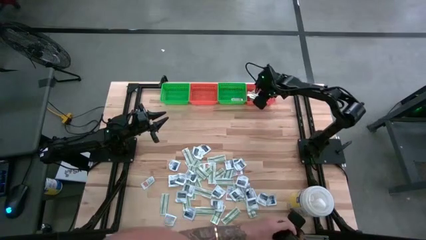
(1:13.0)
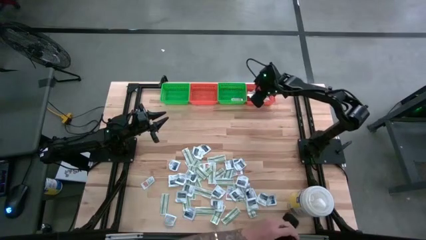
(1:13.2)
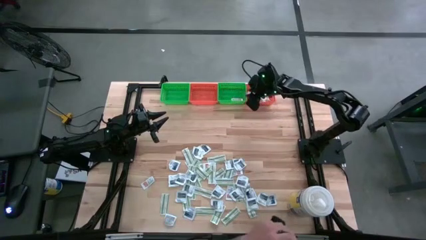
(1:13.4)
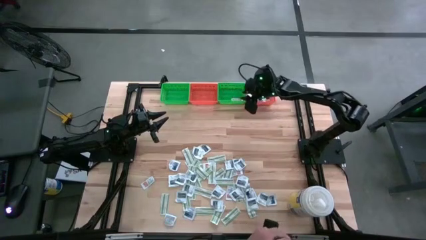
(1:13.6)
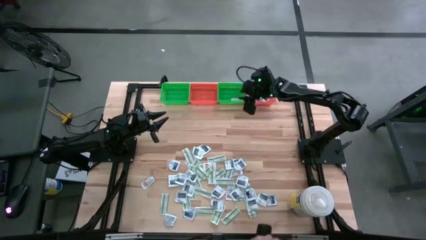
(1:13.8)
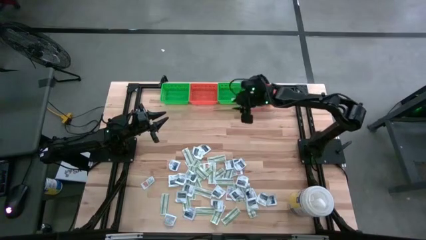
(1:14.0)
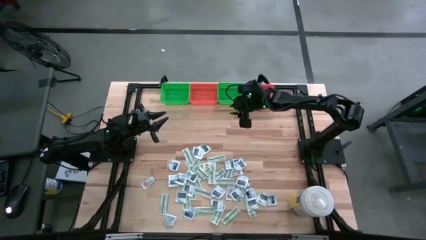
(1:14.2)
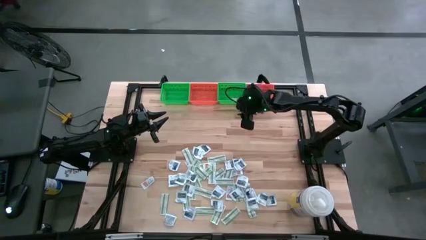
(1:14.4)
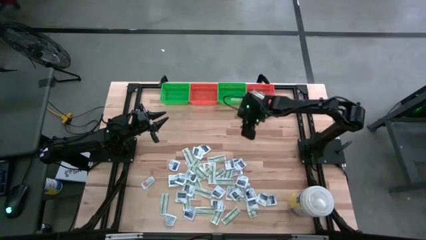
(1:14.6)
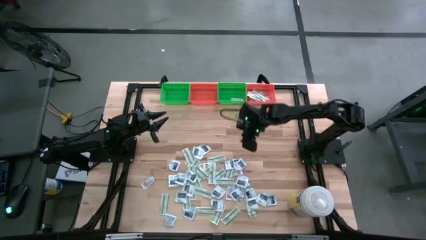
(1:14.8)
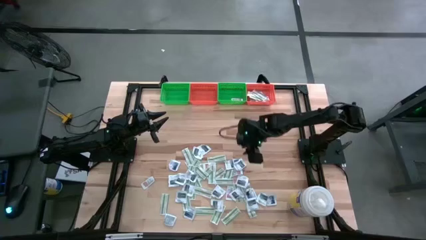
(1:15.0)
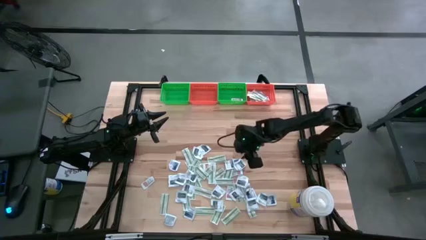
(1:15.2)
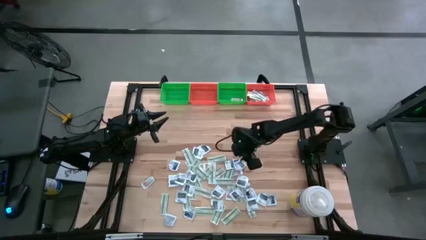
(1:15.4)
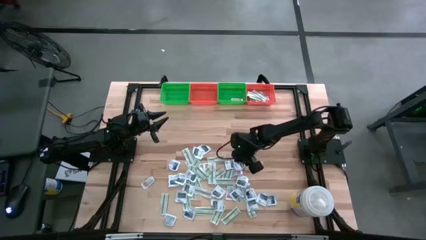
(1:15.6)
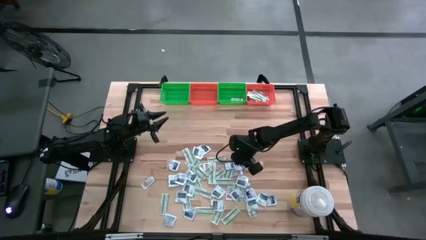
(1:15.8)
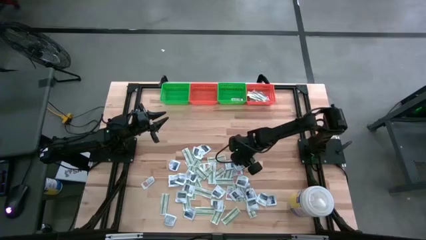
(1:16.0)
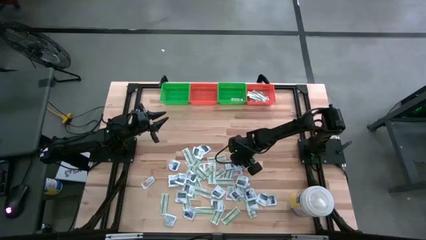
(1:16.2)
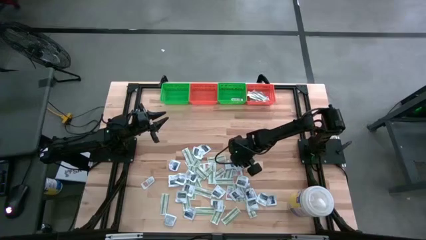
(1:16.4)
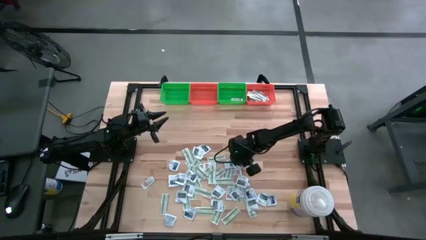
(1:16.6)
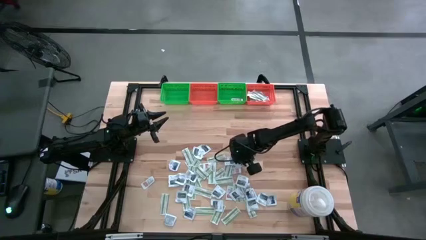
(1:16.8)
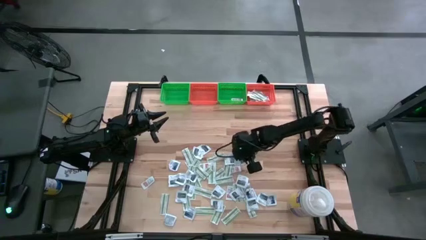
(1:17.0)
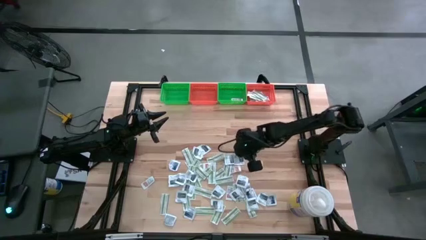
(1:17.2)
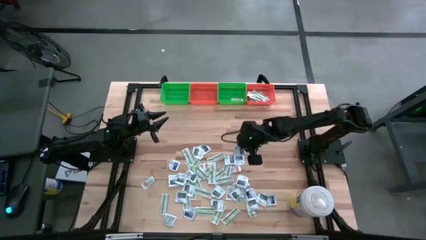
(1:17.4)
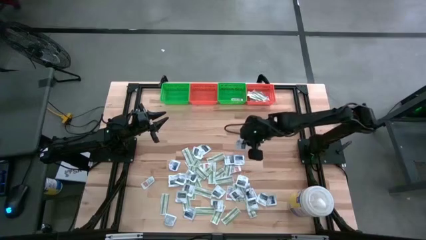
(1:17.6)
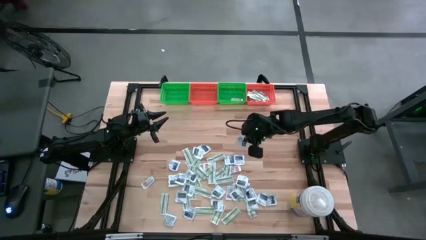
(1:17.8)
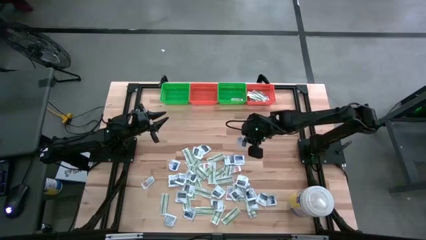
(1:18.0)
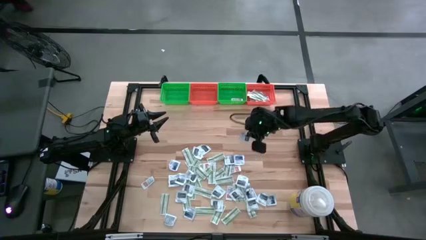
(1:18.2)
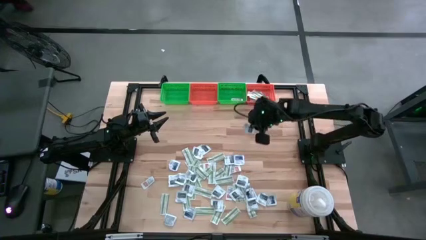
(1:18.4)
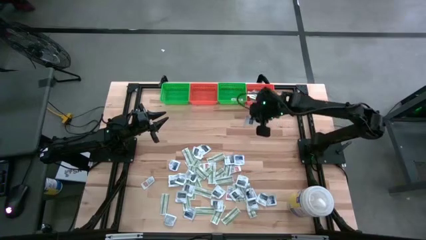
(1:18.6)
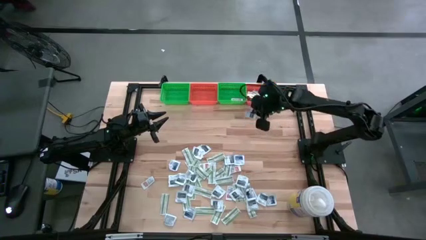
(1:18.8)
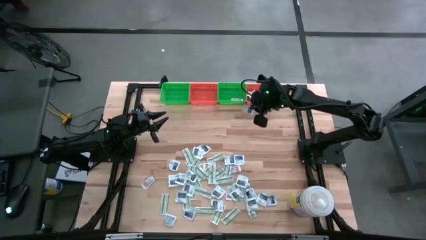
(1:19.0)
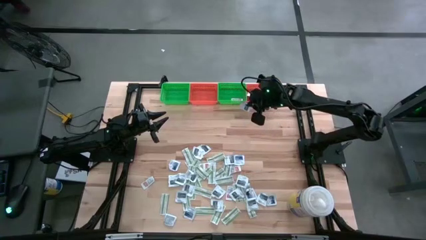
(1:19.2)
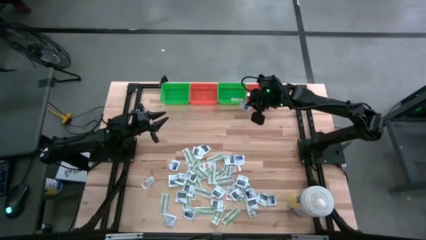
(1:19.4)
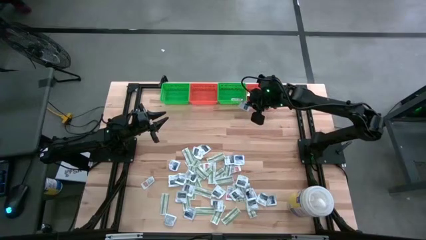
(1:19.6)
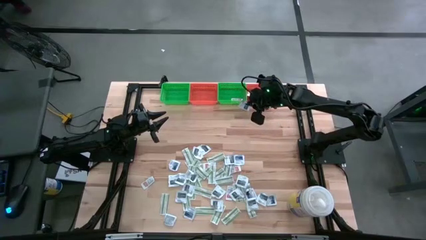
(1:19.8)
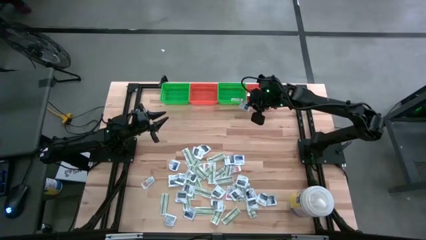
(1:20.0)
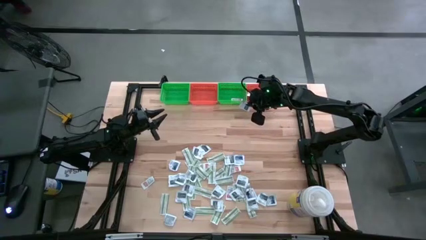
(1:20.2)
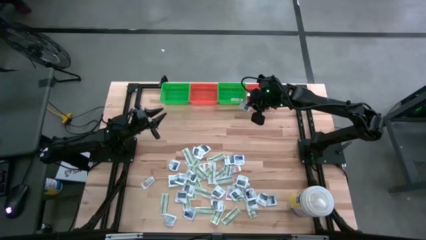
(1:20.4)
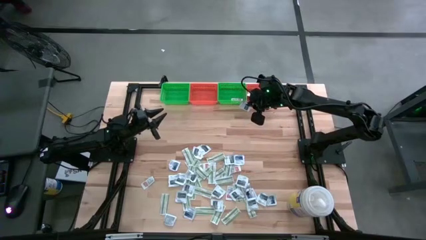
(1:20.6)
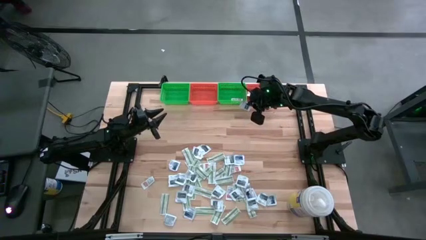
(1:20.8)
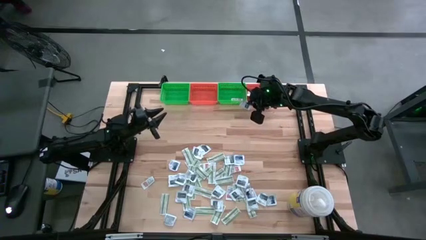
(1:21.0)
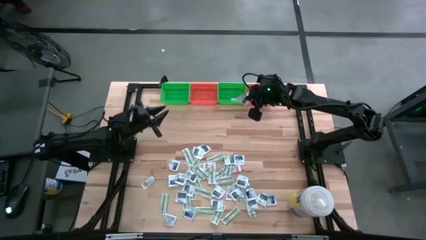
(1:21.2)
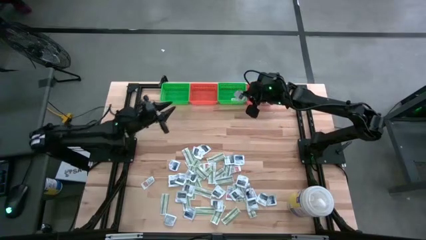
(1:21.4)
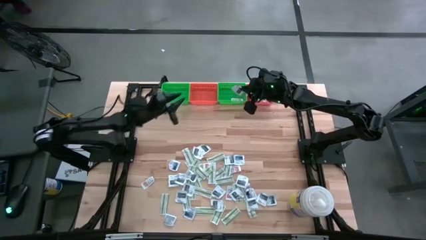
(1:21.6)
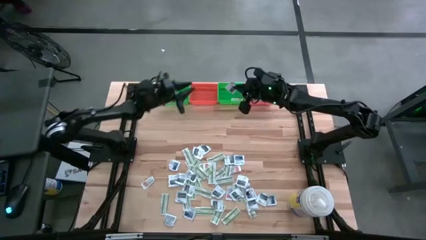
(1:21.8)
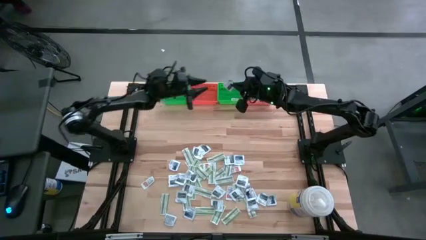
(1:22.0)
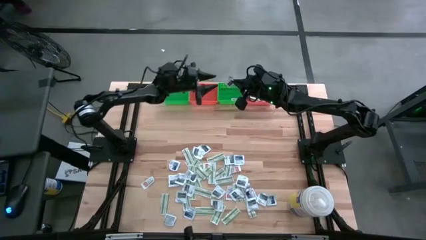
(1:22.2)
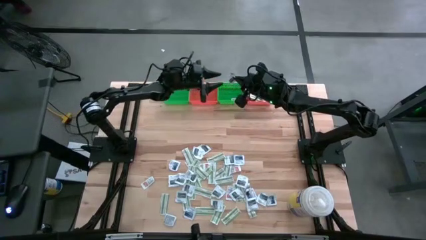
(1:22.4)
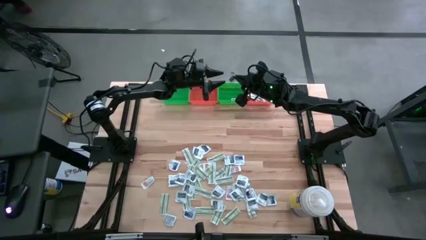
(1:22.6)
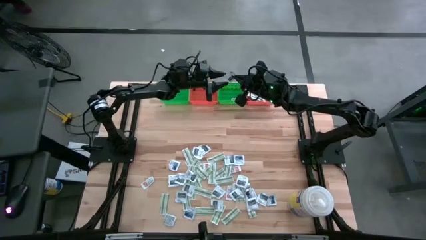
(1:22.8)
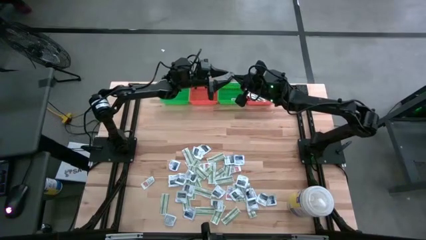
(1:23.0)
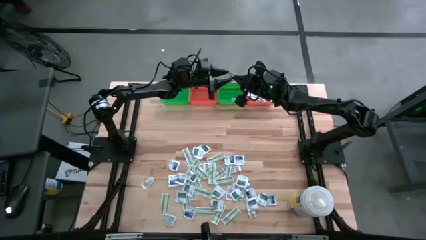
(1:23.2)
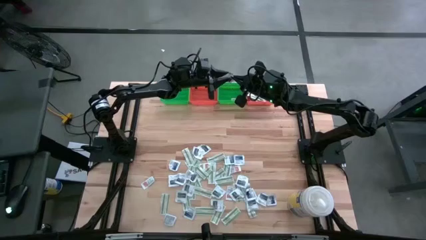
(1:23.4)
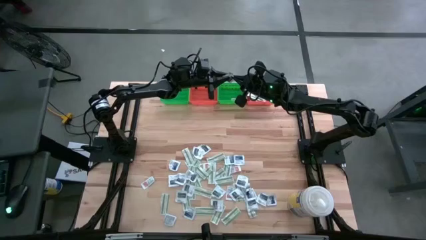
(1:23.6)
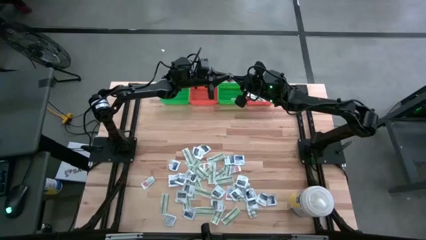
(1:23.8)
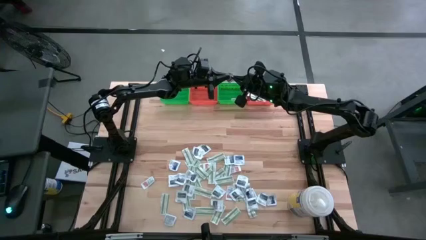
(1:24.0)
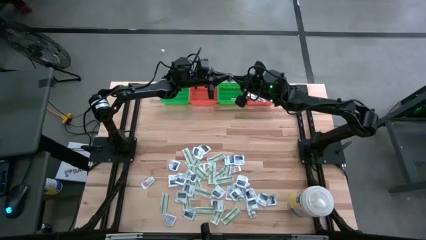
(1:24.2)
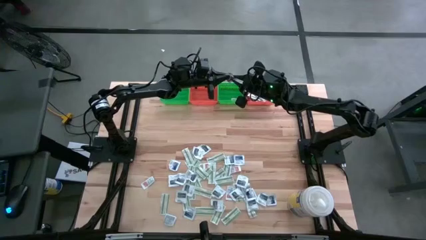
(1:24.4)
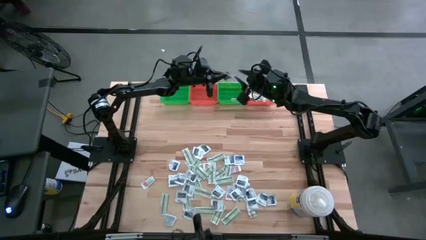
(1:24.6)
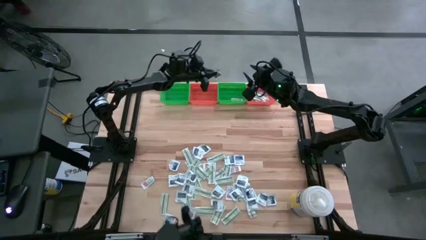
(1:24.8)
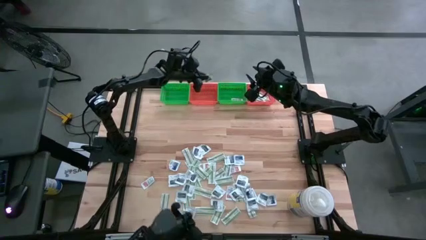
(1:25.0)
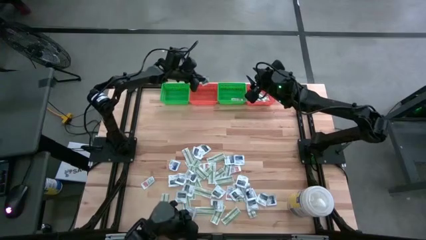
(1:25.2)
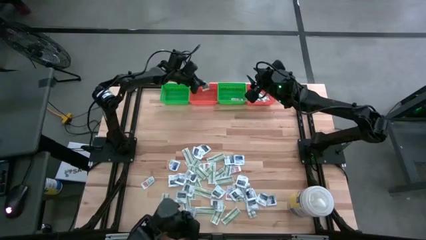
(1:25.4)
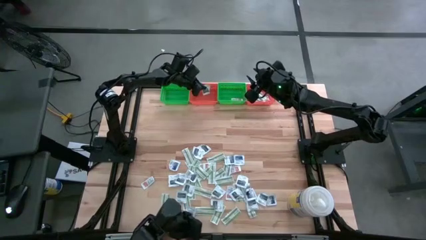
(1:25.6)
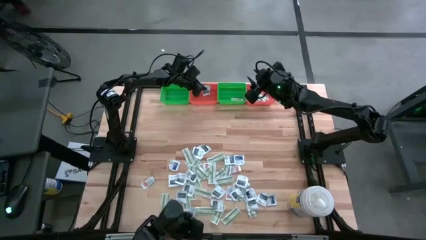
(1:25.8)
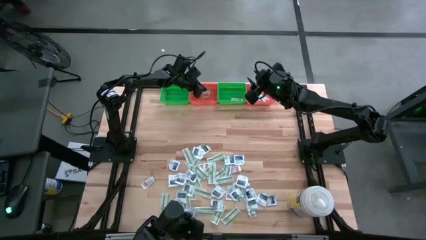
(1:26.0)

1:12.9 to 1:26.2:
Task: Pick & Place First Aid Supplies
Put the gray towelette pack in the left orange bin
